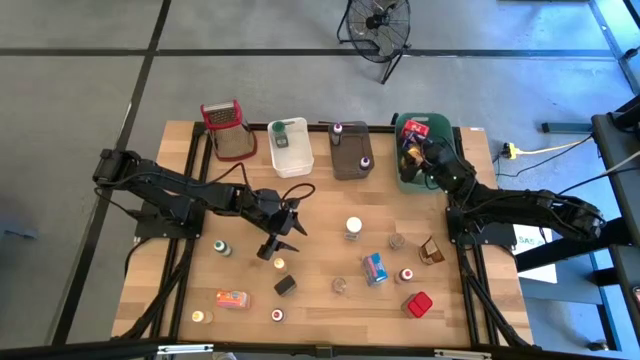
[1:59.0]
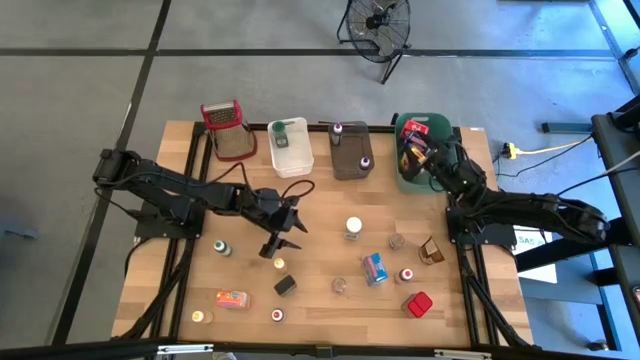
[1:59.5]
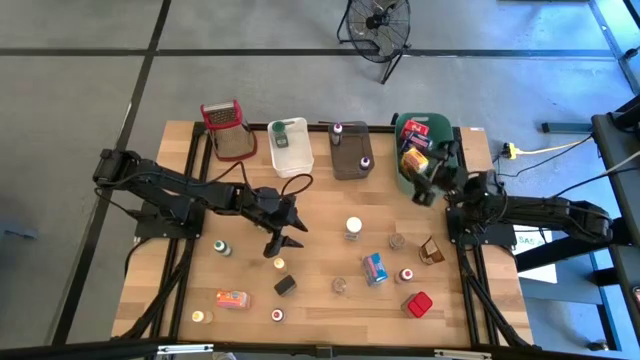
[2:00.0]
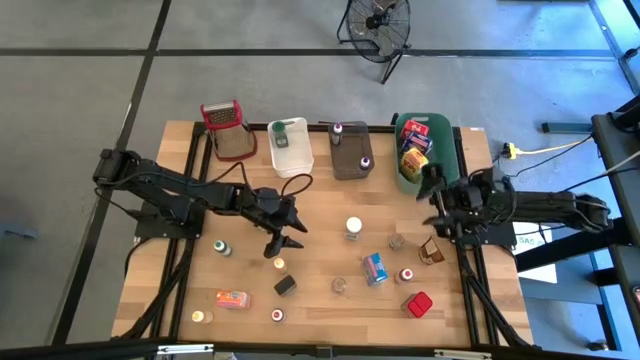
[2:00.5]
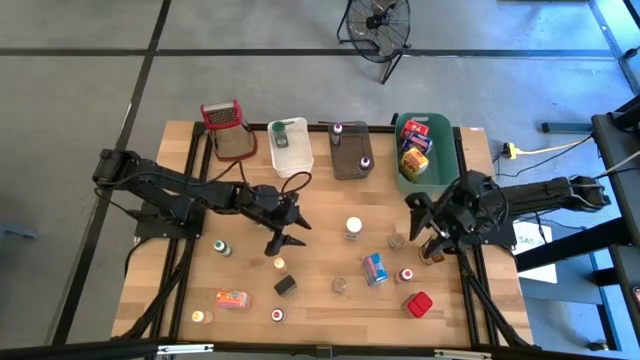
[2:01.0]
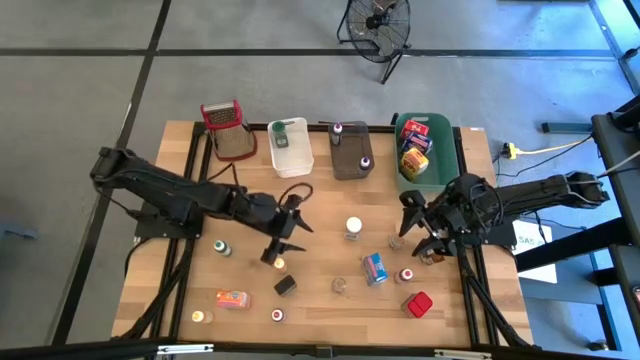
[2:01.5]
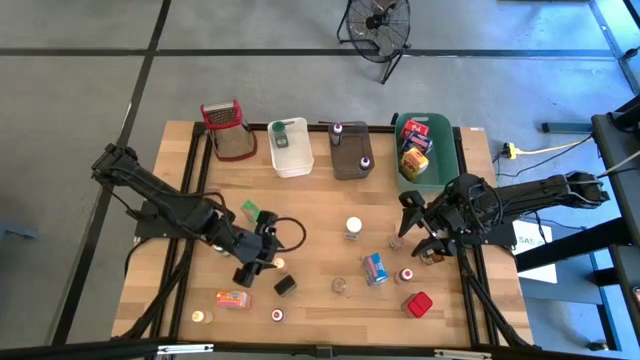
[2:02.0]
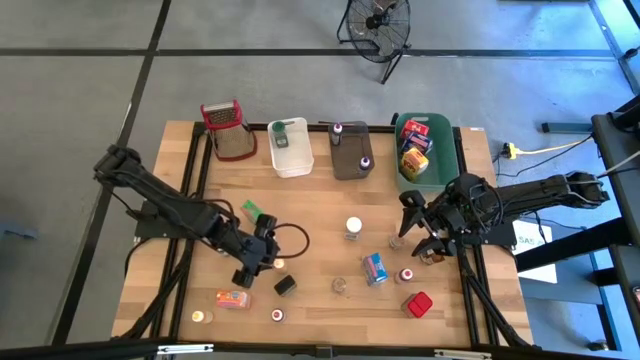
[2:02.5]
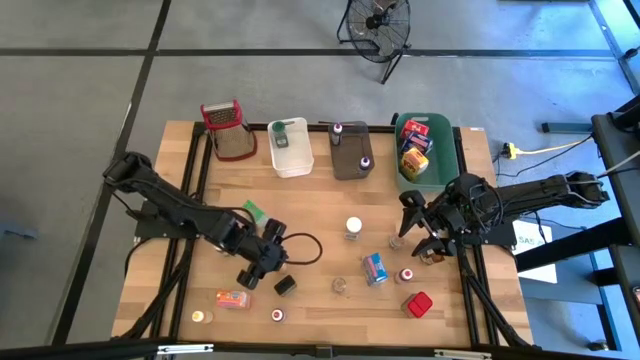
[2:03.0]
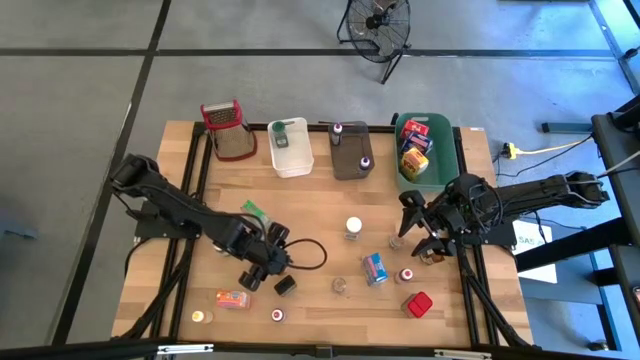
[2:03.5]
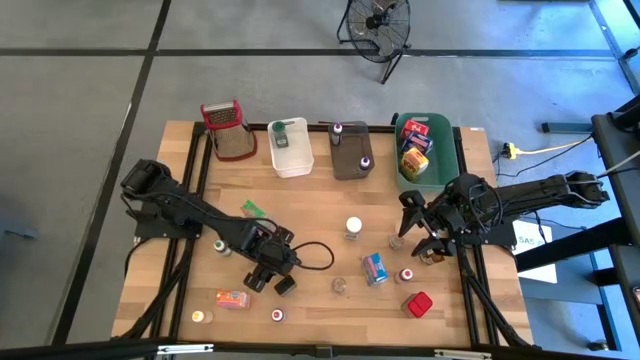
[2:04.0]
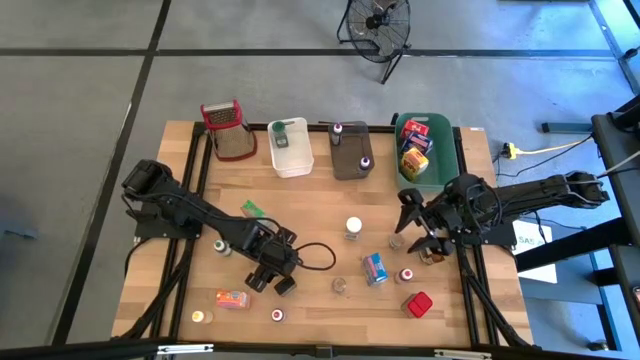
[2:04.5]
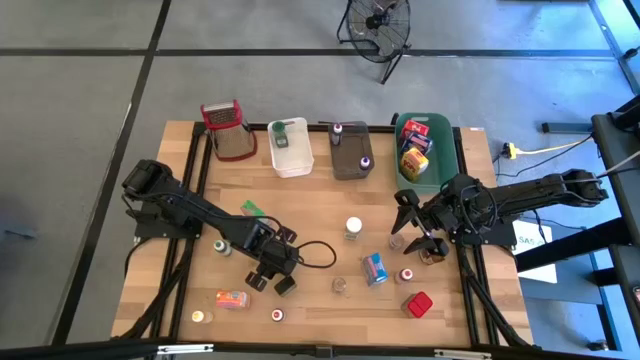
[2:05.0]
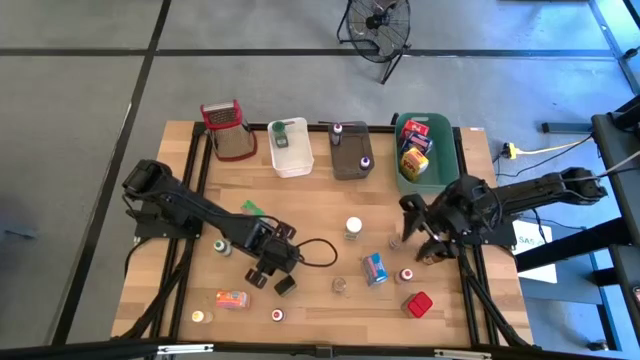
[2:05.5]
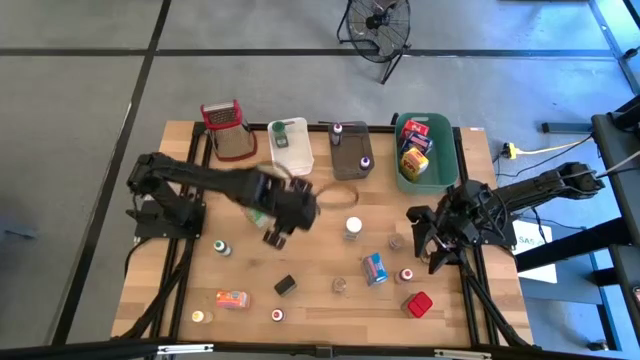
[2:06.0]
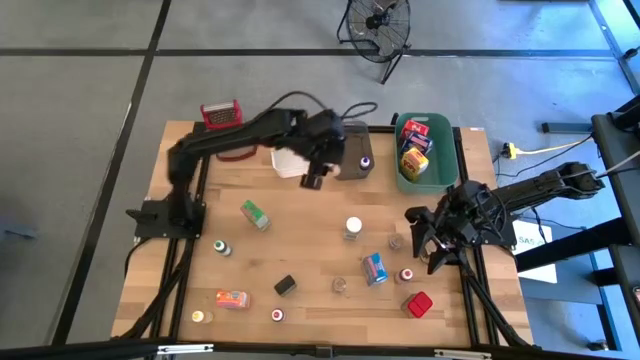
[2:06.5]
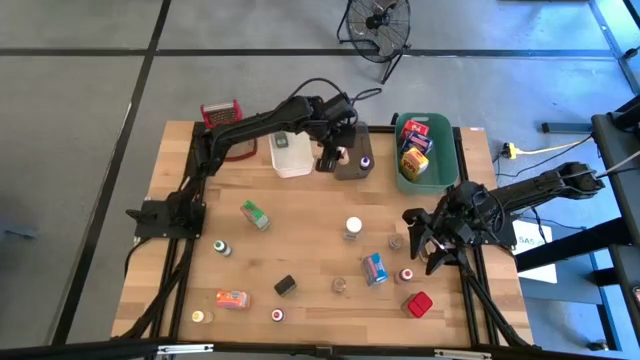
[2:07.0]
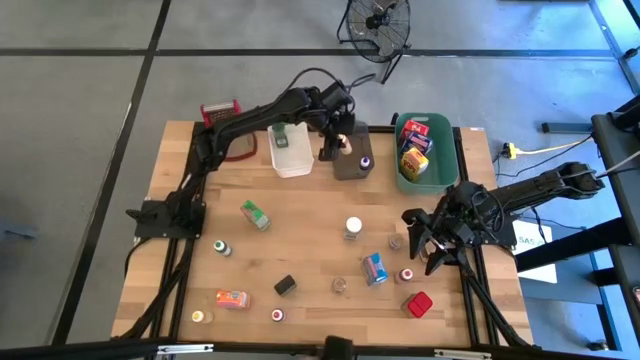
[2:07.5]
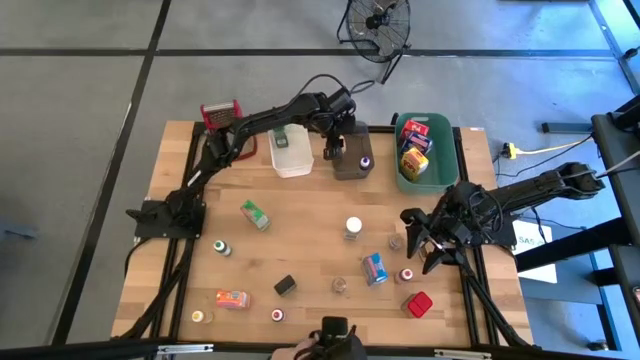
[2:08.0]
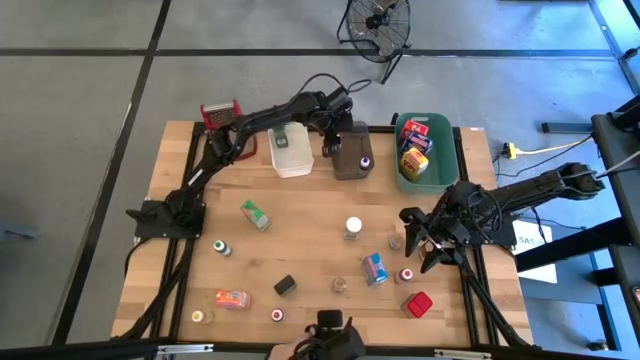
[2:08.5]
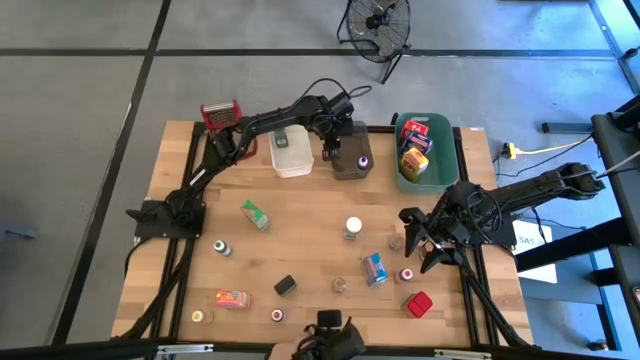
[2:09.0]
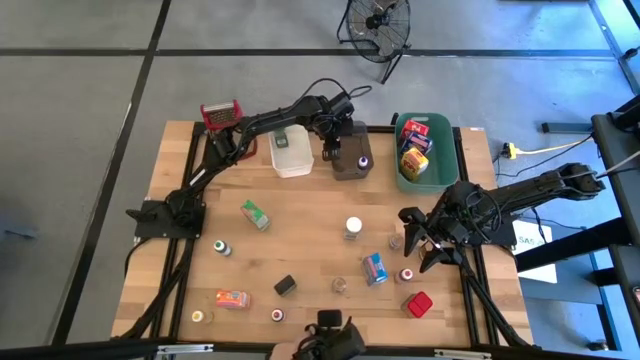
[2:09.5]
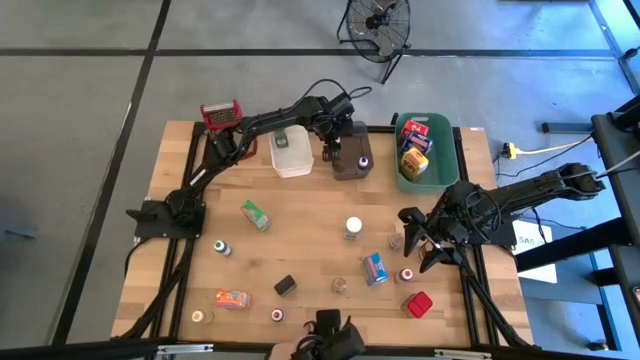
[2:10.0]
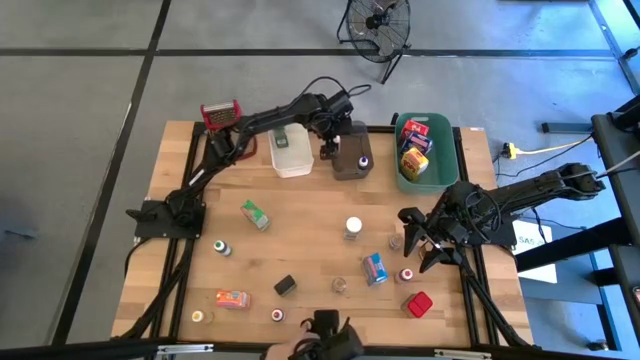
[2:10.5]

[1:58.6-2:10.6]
Task: Pick & Place Kitchen Items
Put the top yellow coloring bottle into the black transparent bin

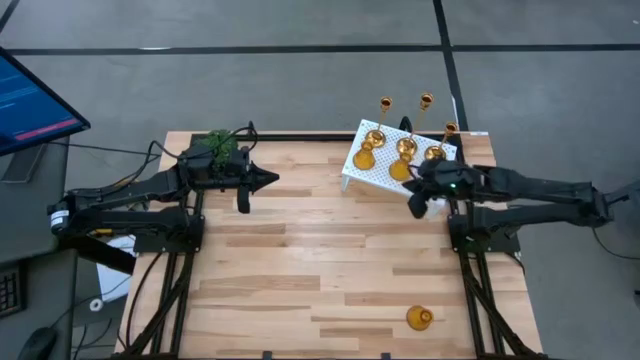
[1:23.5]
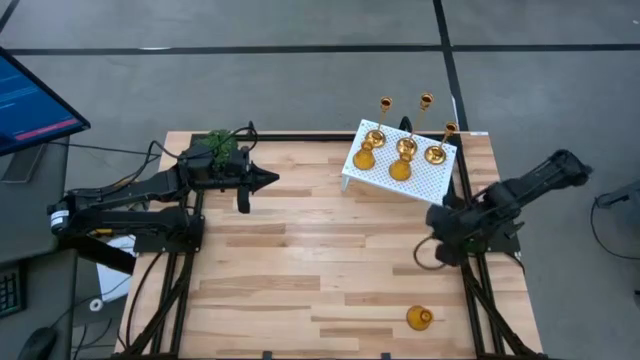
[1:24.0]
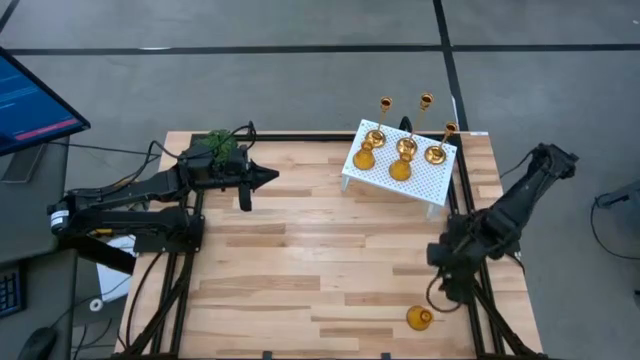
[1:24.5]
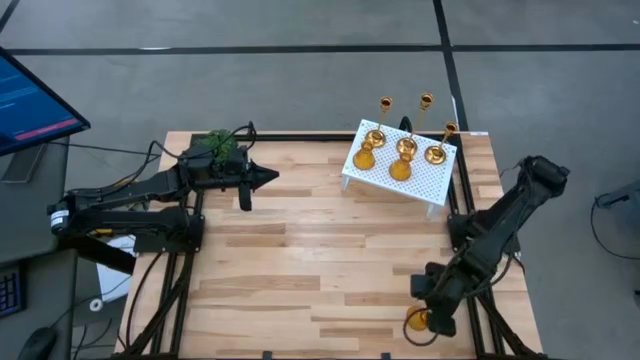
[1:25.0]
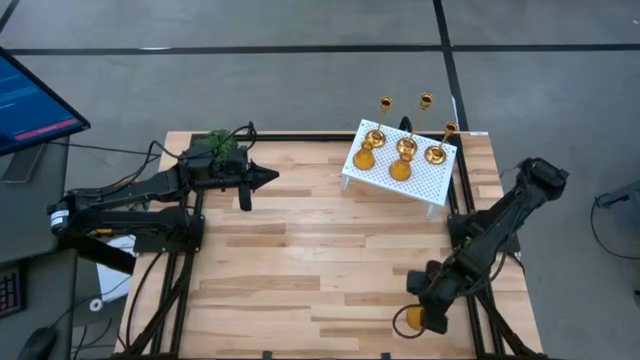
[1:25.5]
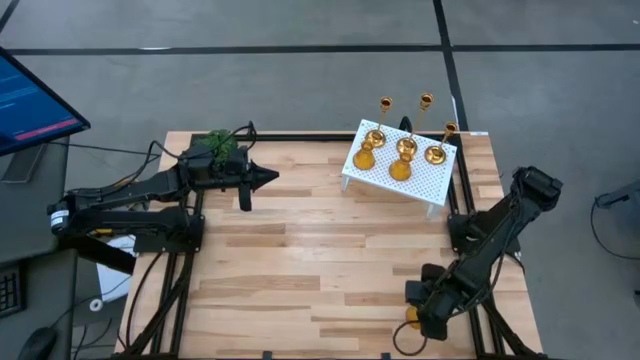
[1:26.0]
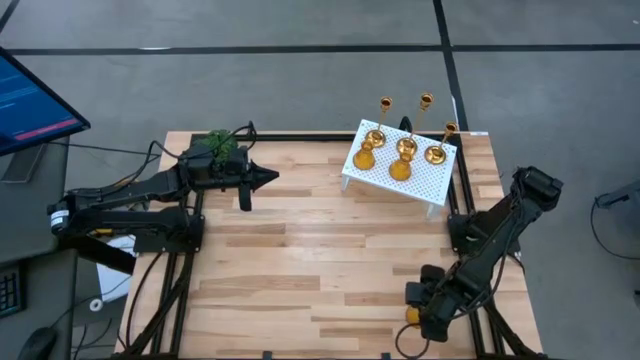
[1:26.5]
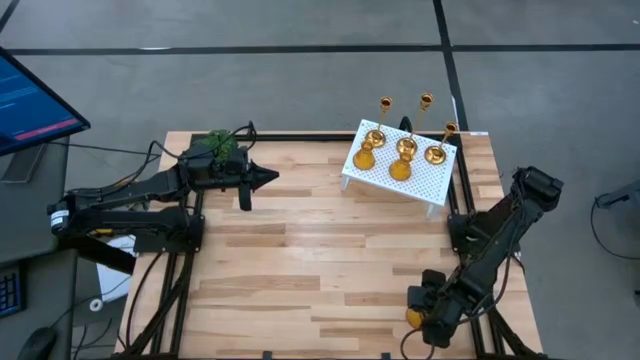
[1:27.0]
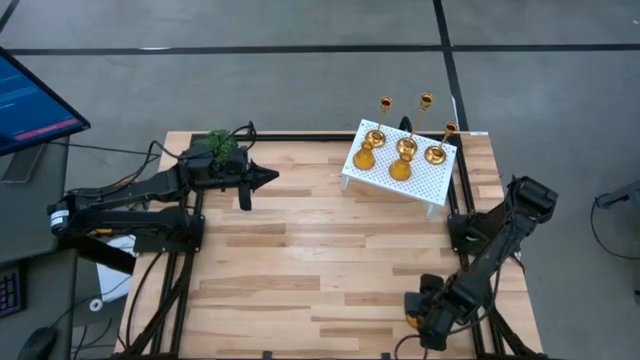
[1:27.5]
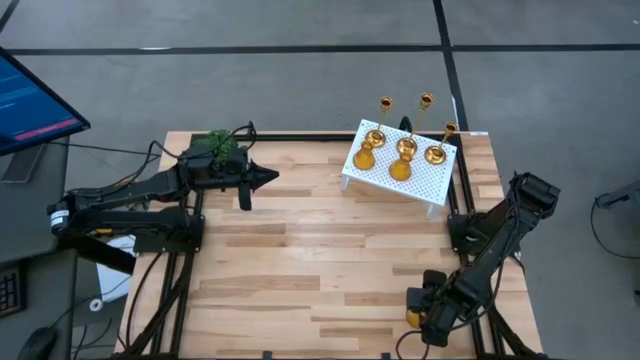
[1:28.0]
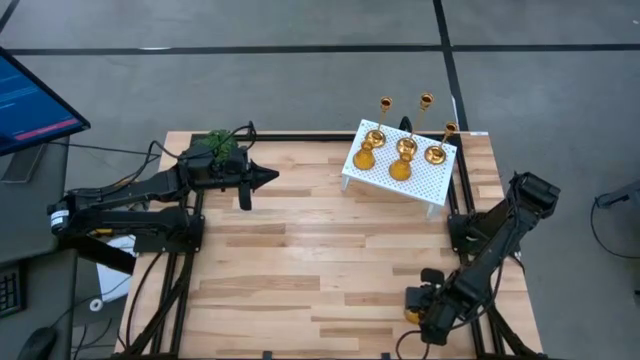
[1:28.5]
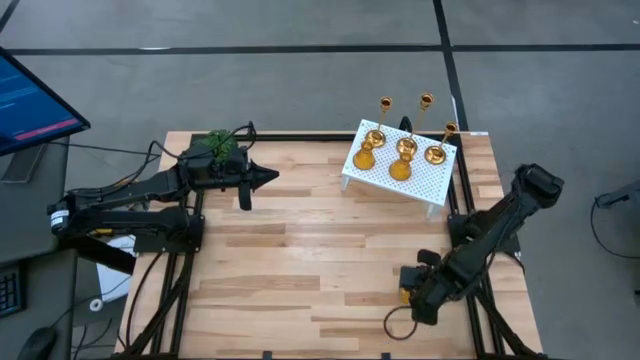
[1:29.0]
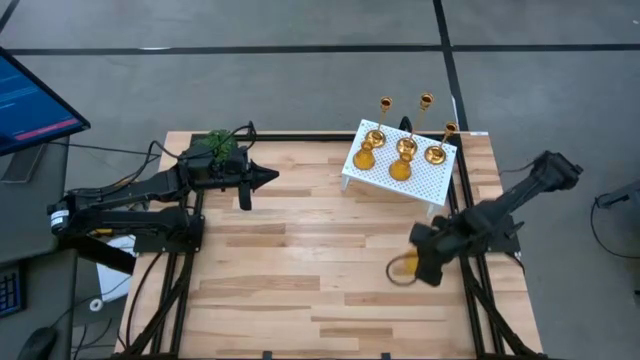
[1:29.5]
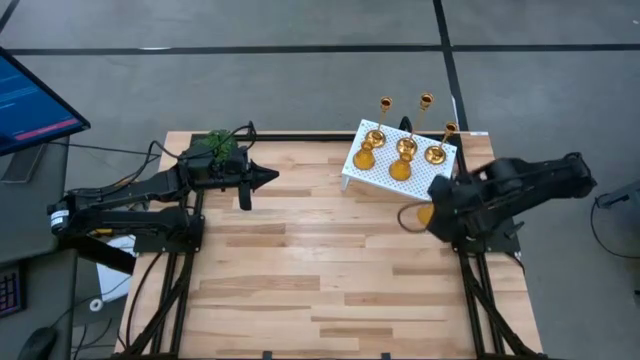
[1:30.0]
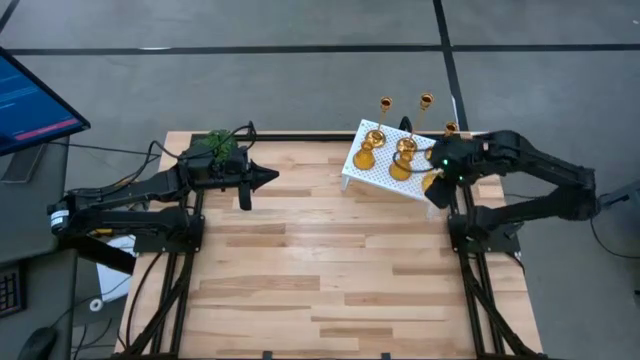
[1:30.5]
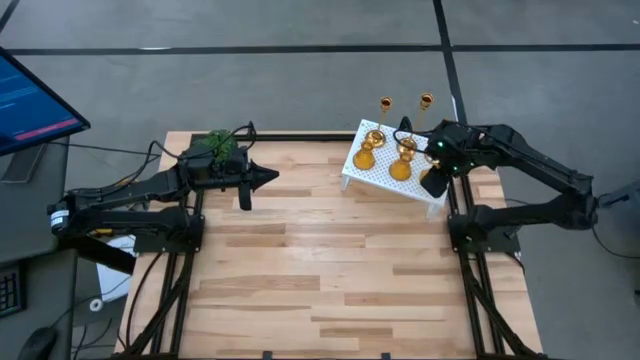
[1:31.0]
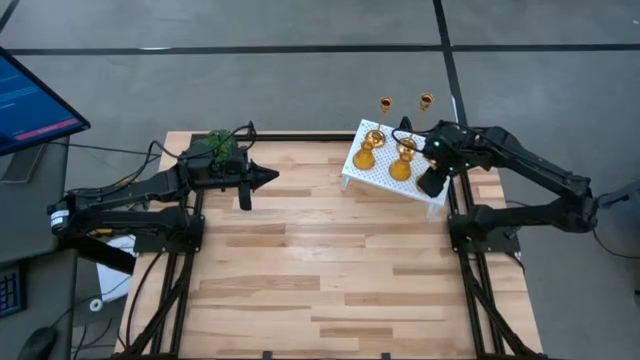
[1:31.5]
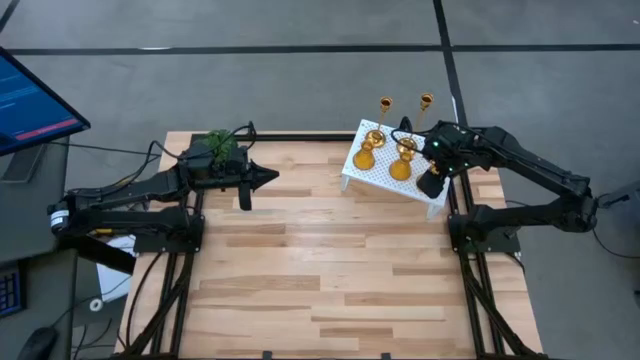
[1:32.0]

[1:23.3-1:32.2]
Task: Pick & Place candle stick holders
Put the yellow candle holder on the shelf aligned with the other yellow candle holders
